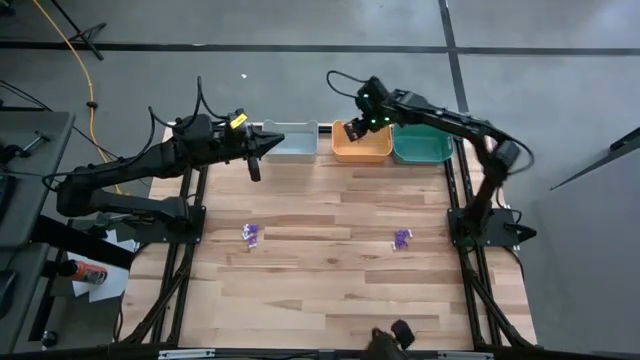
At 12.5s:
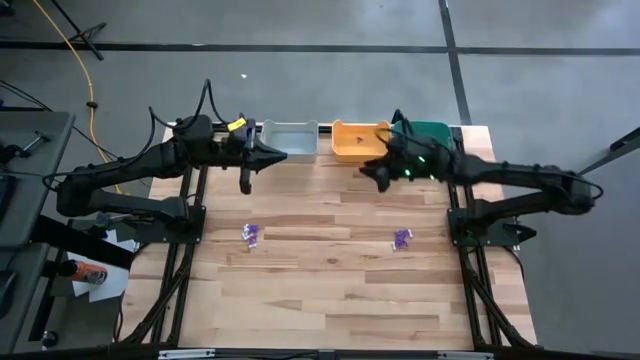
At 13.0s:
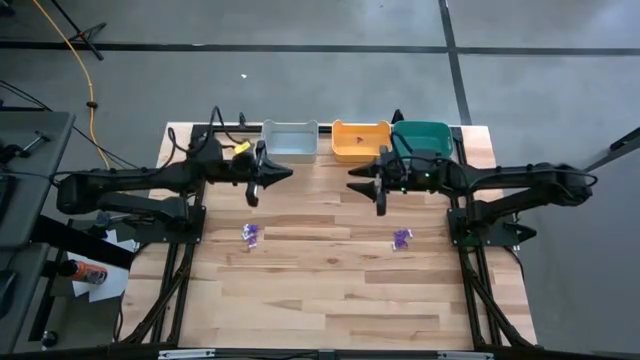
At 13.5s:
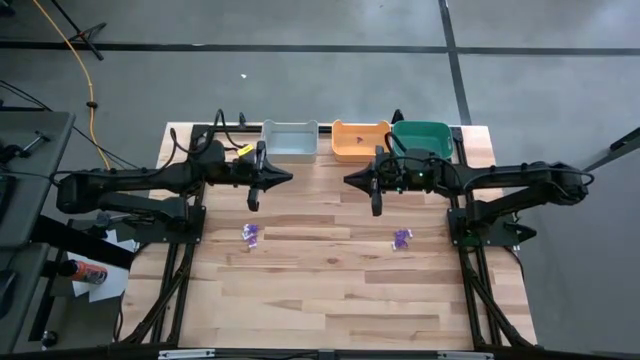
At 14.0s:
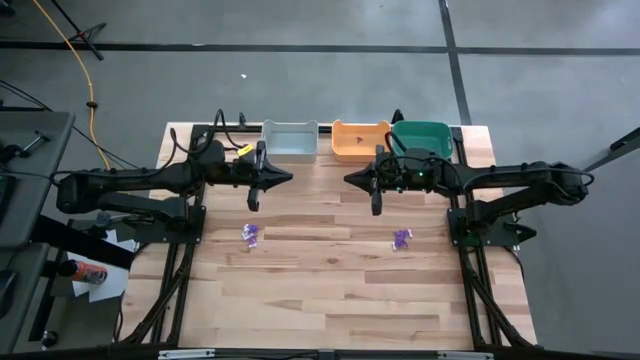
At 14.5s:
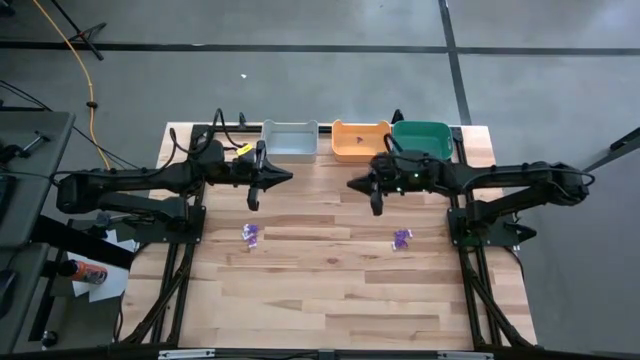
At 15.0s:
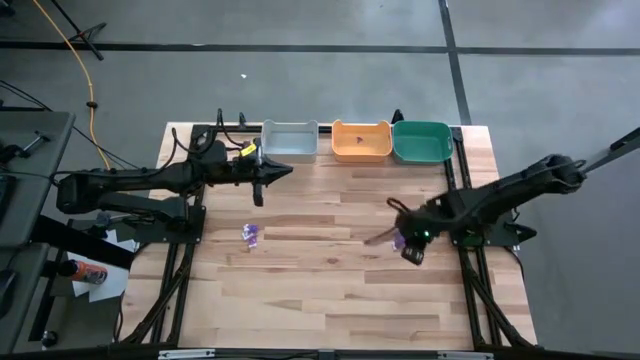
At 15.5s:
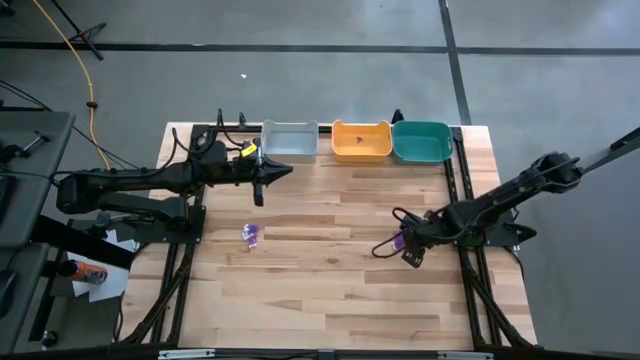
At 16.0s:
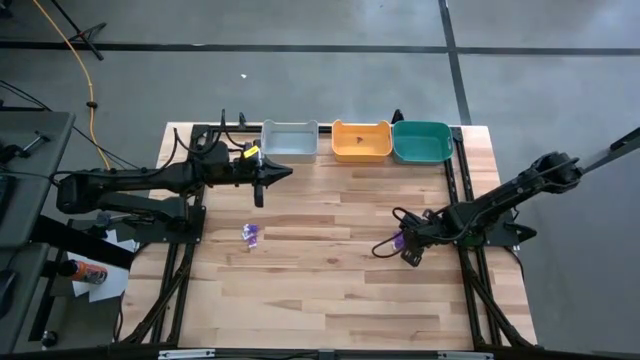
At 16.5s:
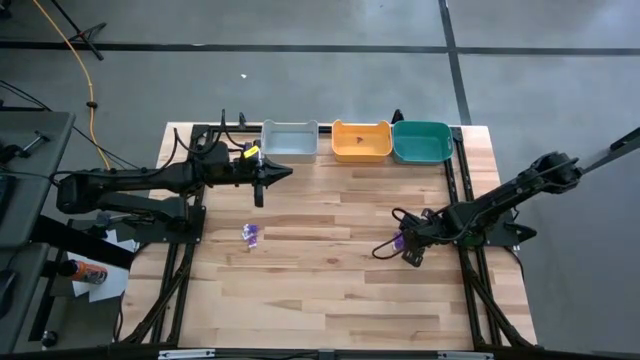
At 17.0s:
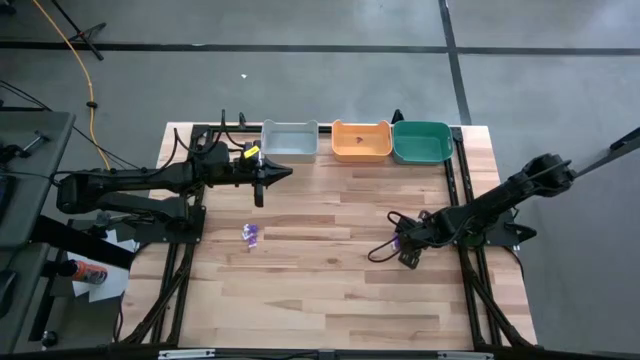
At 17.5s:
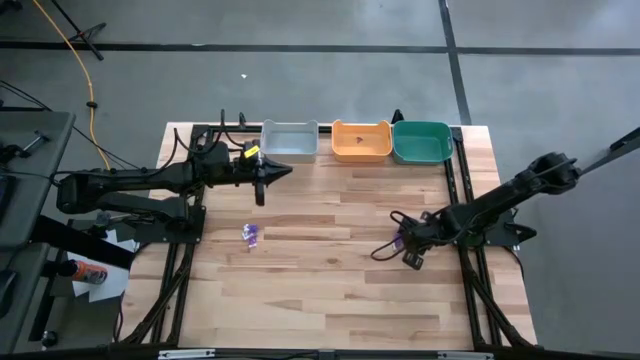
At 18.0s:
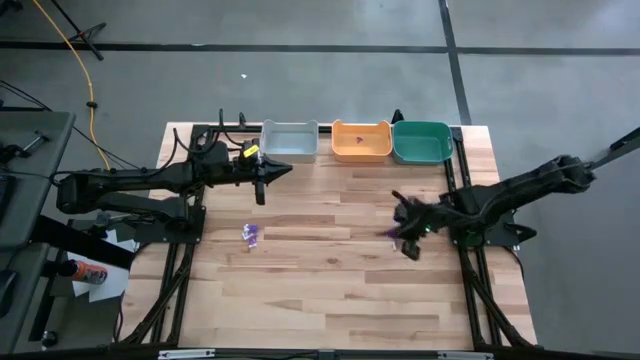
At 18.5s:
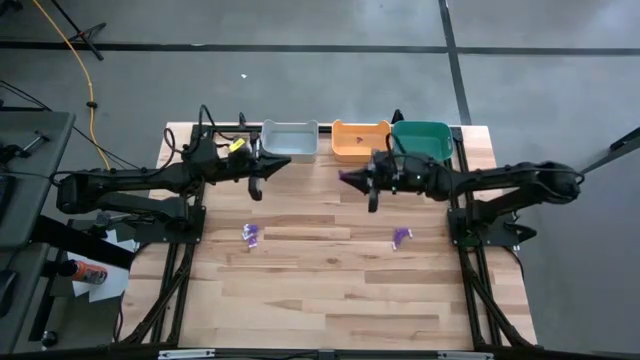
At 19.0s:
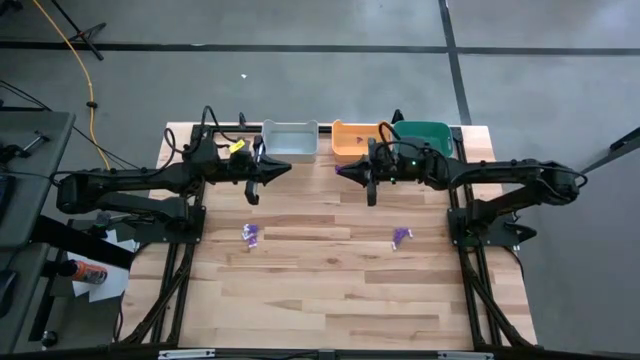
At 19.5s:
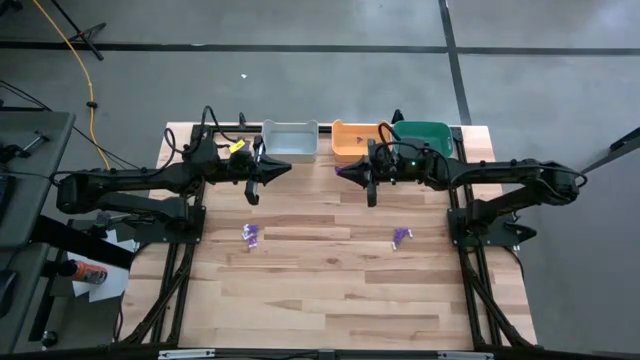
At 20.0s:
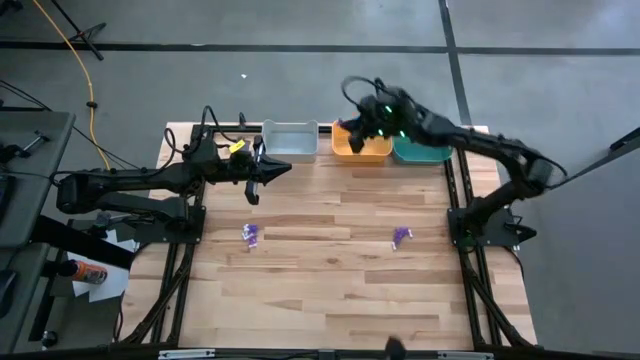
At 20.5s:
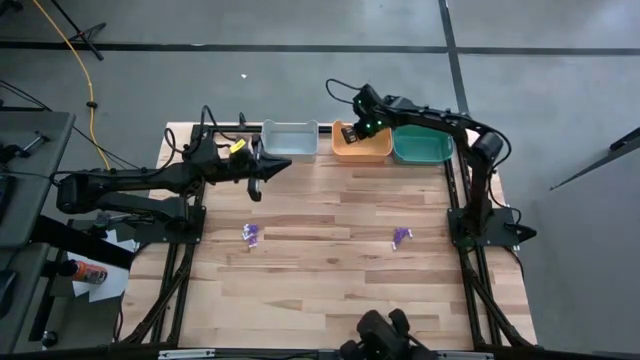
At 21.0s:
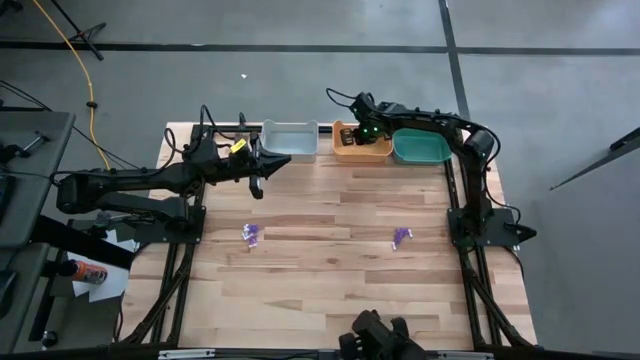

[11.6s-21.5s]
Task: Sort Halloween decoration
Put the purple witch hat toy into the orange bin

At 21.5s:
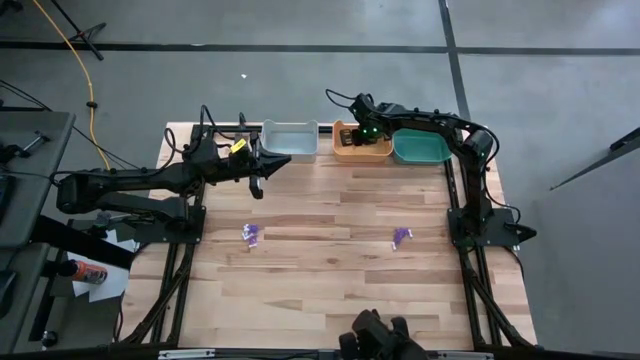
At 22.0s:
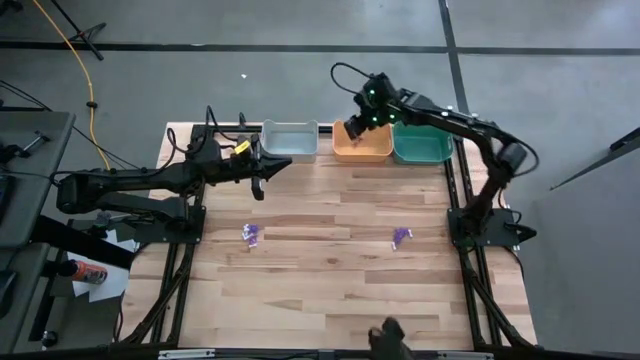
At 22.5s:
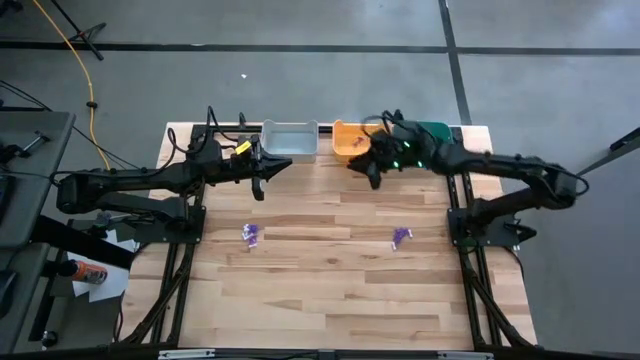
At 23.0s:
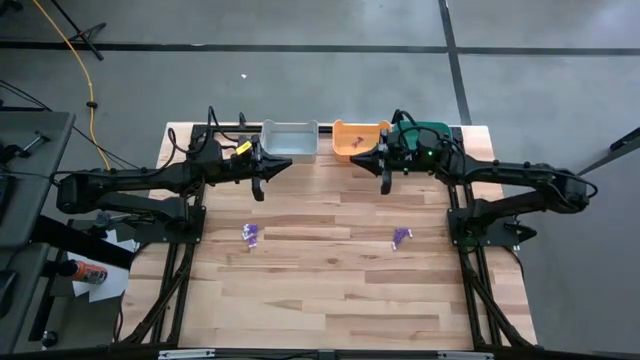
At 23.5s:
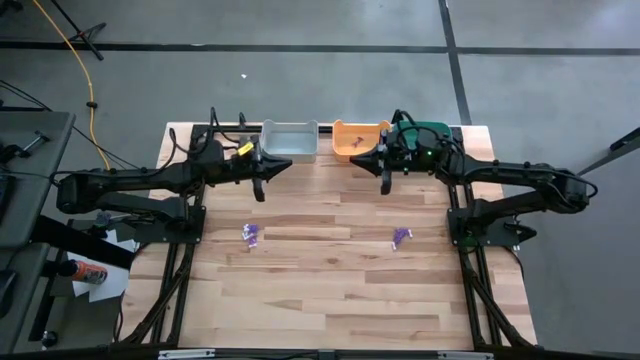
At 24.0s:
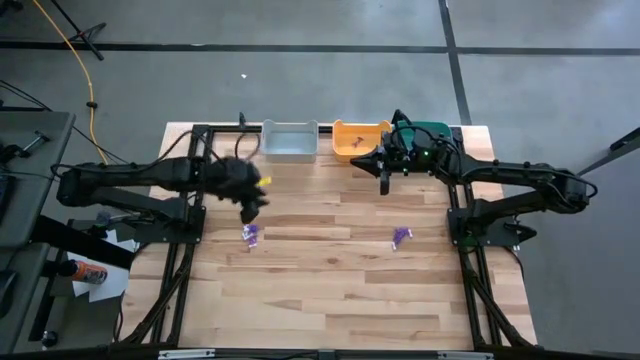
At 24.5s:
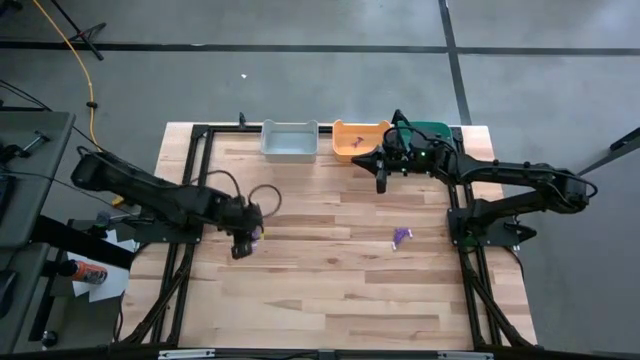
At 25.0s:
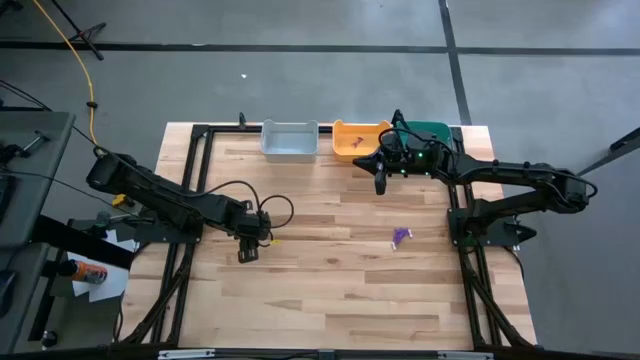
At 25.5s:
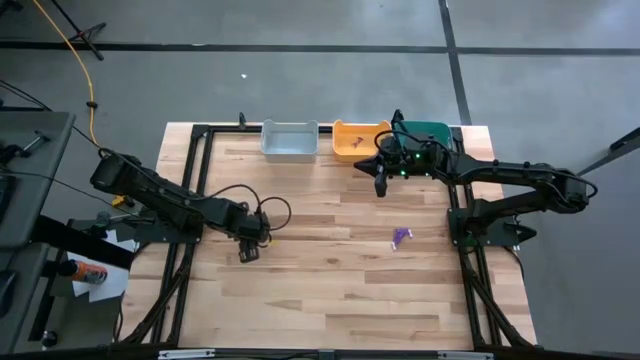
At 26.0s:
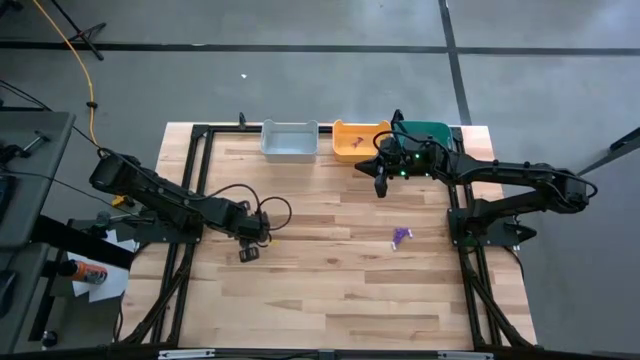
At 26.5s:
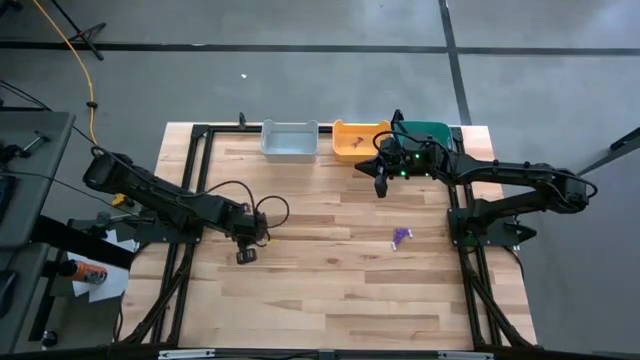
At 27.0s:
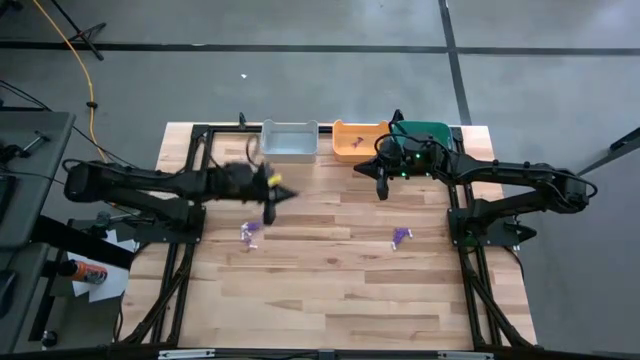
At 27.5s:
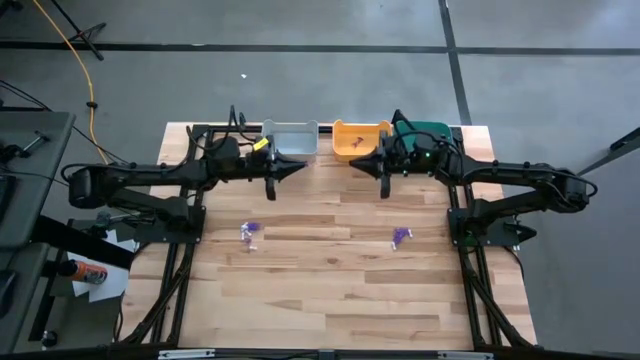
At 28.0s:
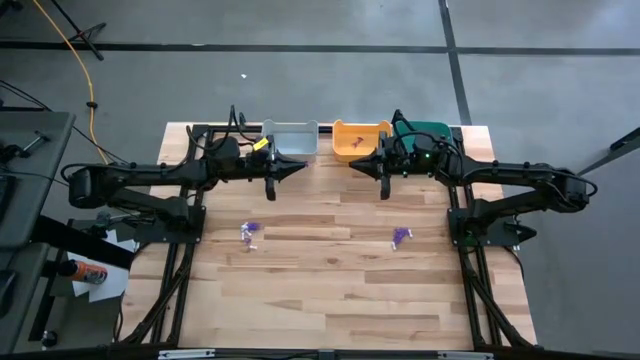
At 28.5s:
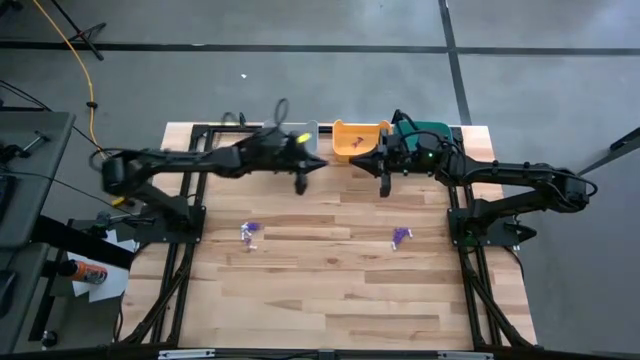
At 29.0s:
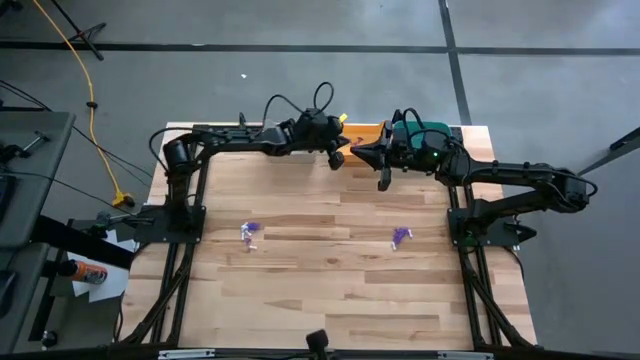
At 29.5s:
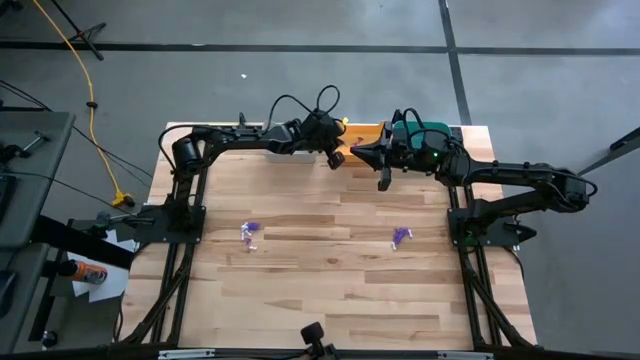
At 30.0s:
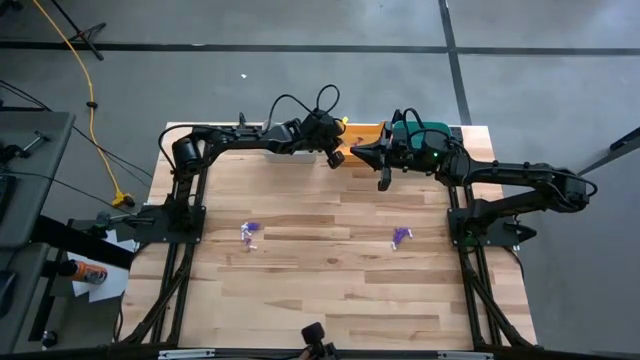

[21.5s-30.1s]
Put the purple witch hat toy into the orange bin
